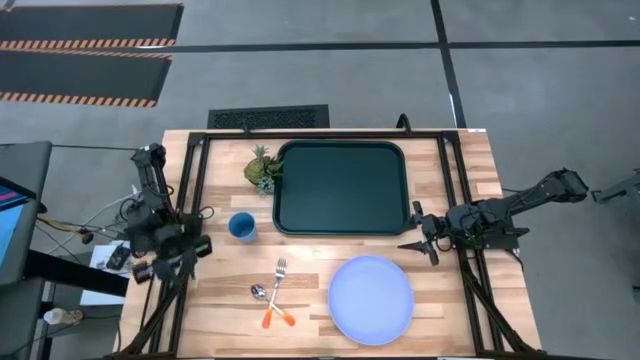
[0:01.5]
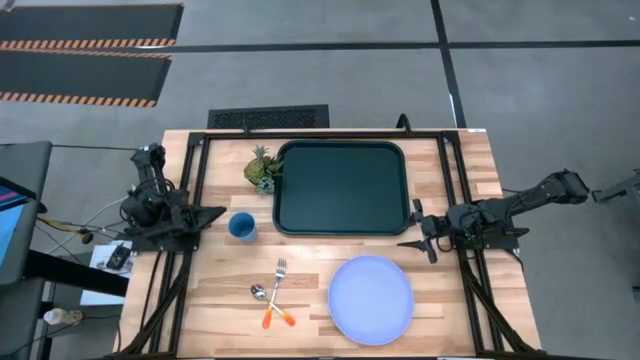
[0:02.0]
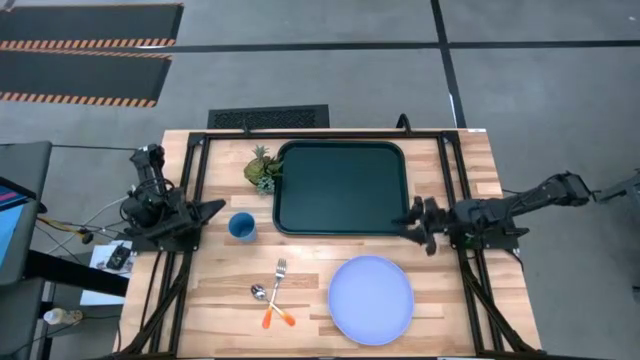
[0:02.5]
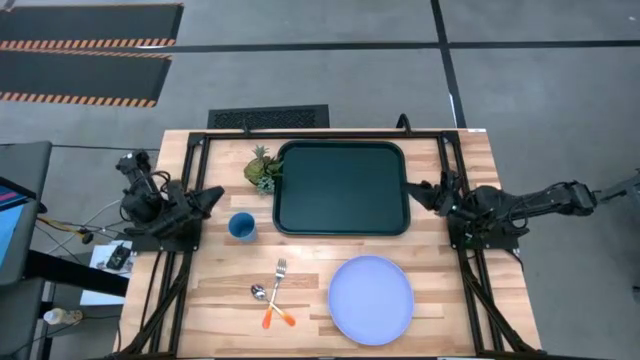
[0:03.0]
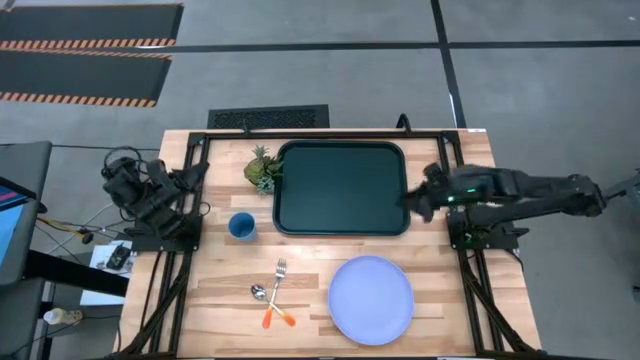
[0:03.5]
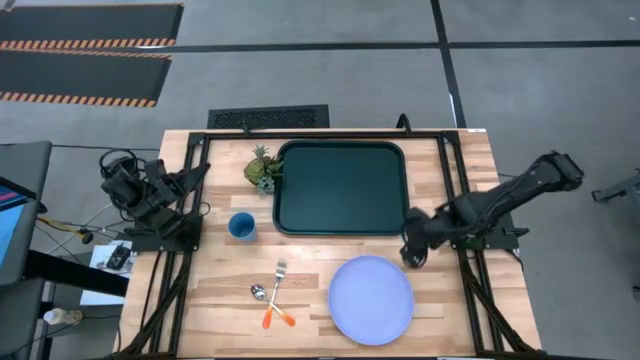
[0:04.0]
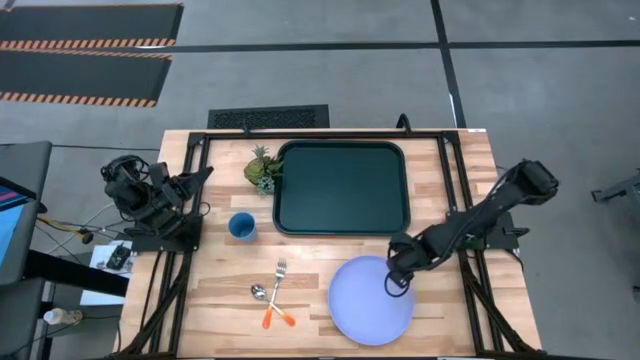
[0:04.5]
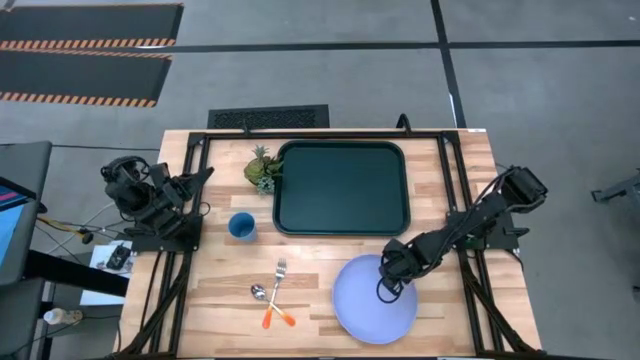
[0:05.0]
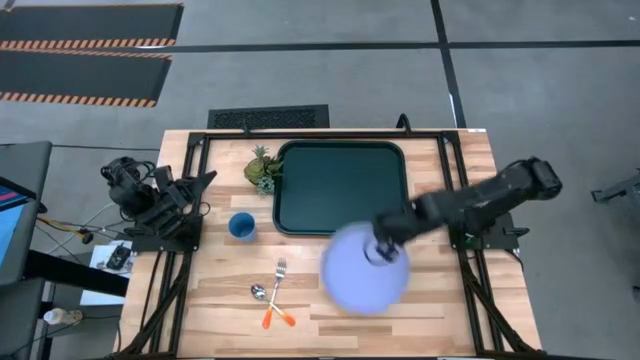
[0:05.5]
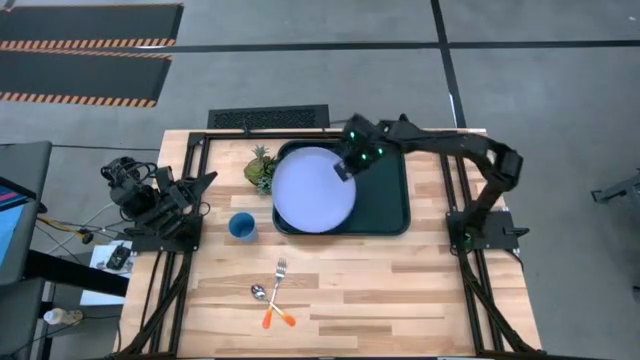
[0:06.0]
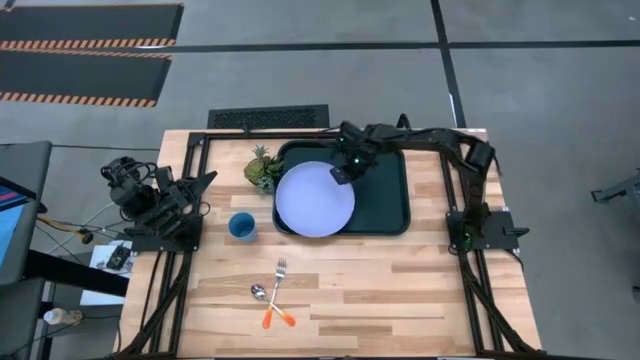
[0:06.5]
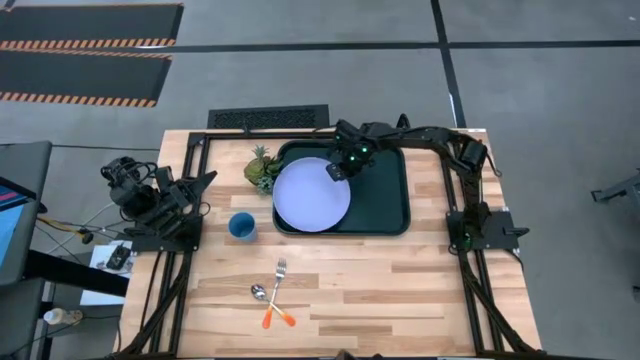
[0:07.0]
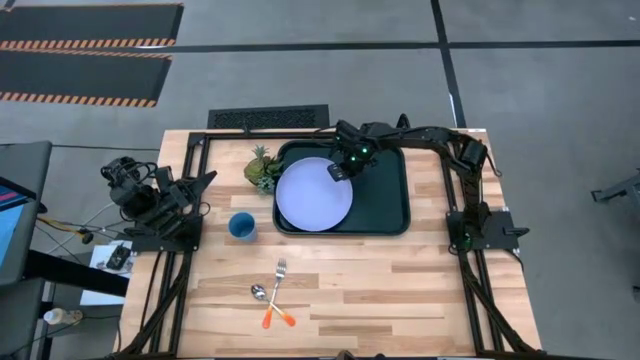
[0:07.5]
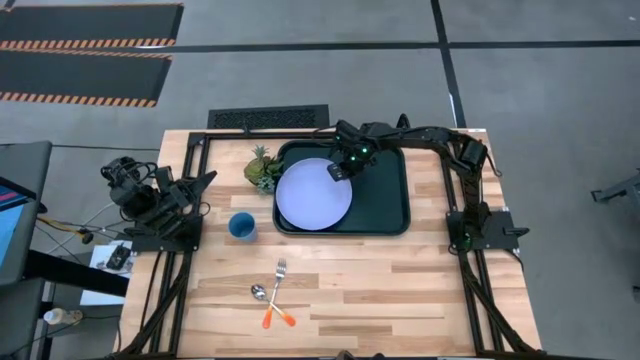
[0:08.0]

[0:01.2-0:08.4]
Task: Pick and place plate/cup/fork/spoon on tray
Put the violet plate on the black tray

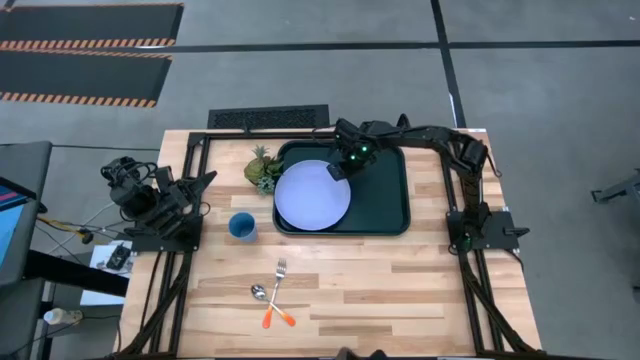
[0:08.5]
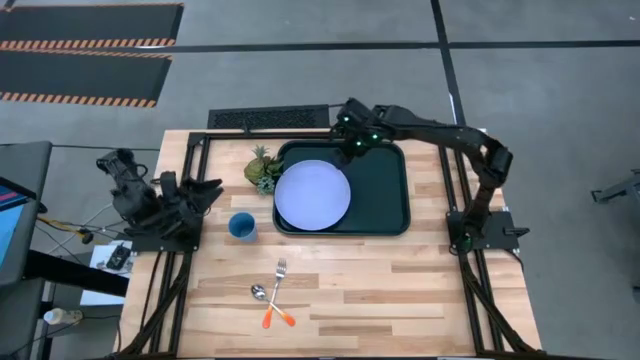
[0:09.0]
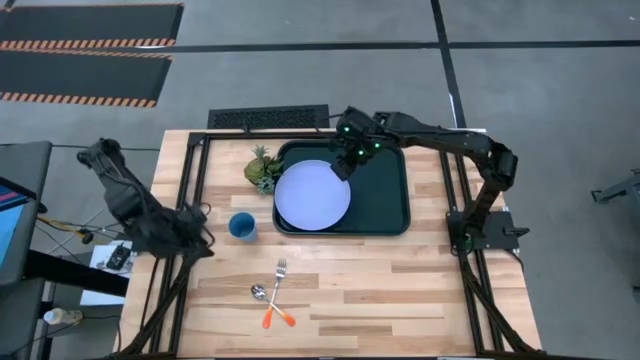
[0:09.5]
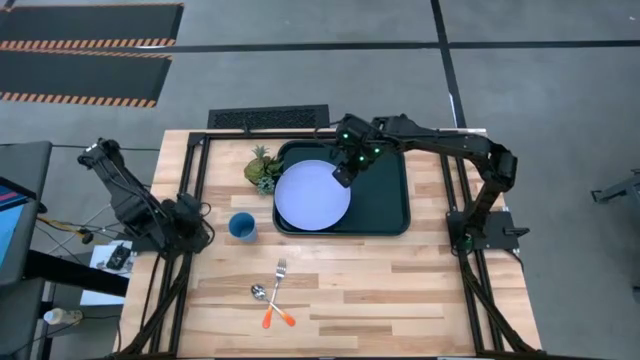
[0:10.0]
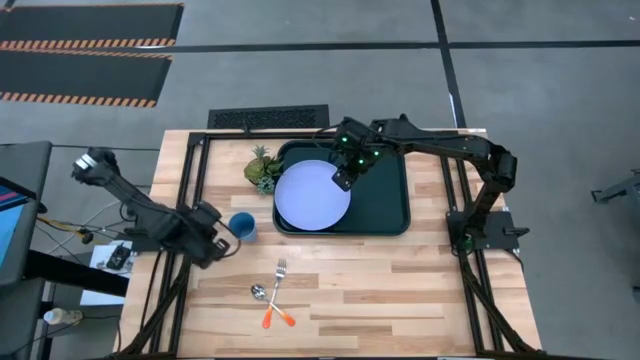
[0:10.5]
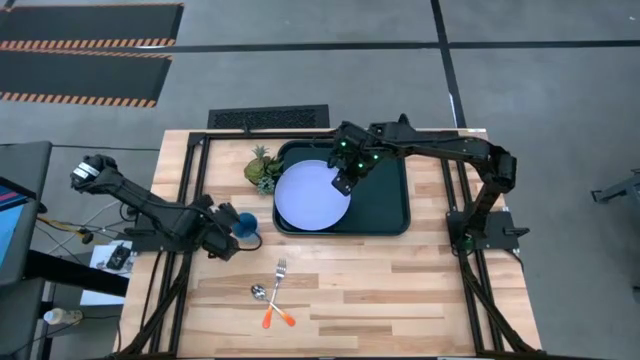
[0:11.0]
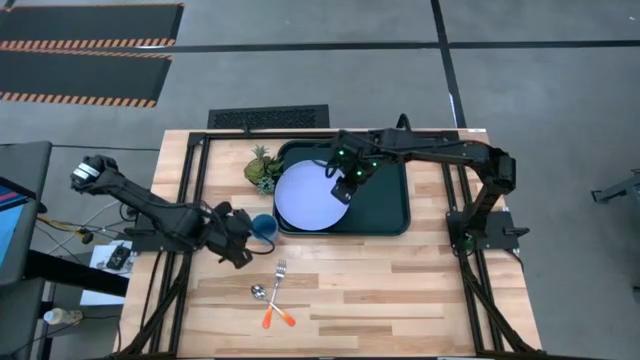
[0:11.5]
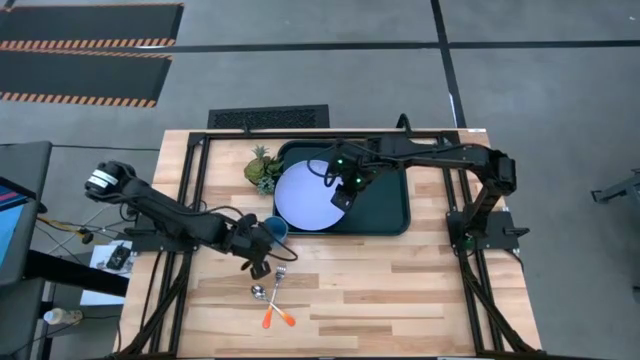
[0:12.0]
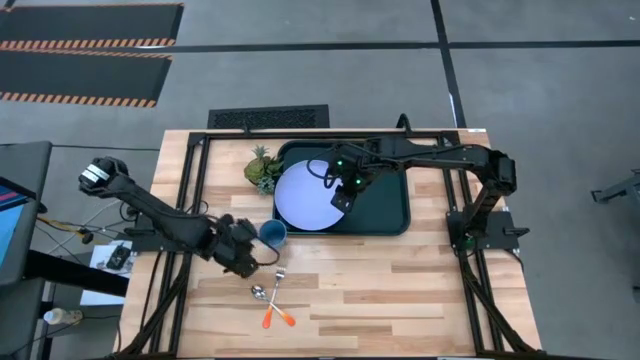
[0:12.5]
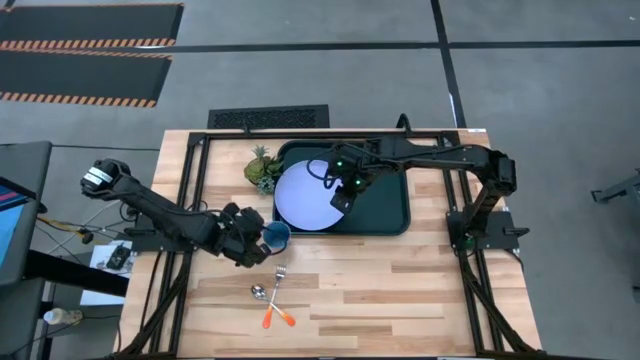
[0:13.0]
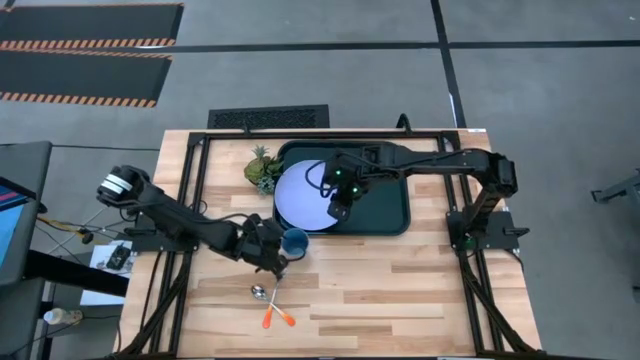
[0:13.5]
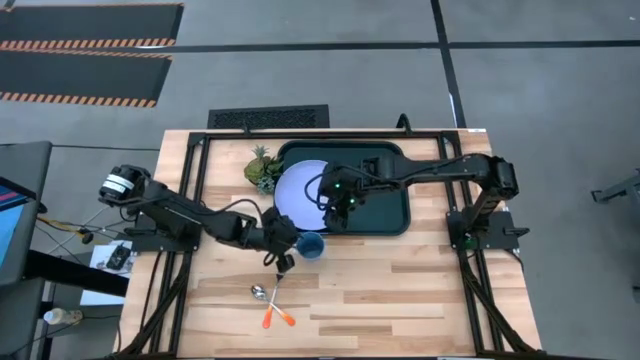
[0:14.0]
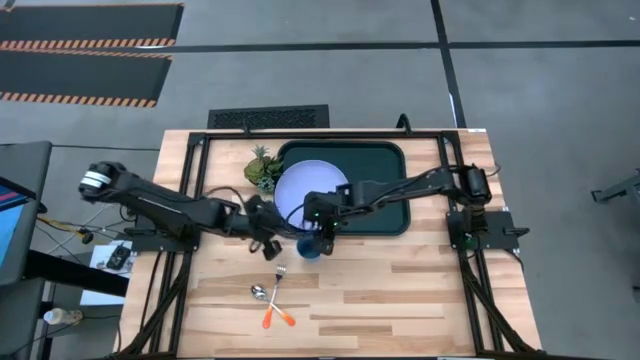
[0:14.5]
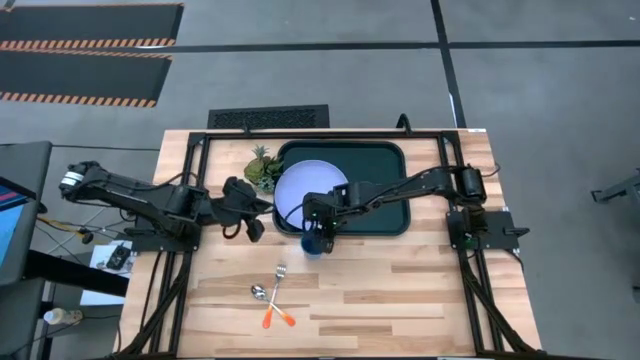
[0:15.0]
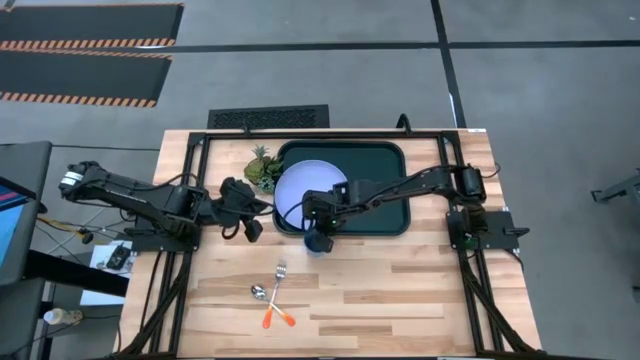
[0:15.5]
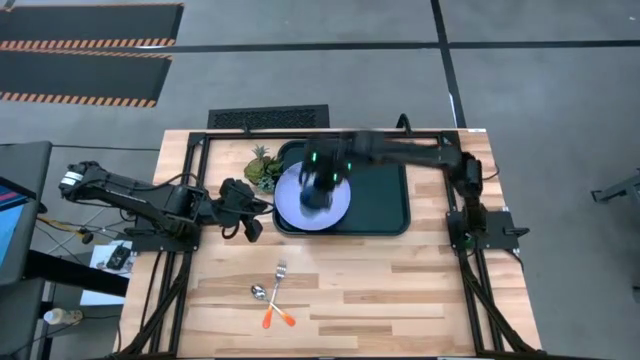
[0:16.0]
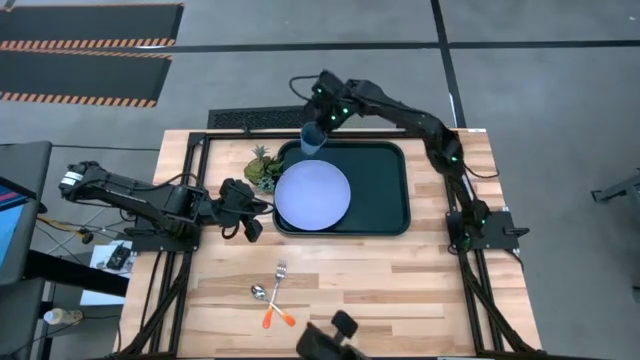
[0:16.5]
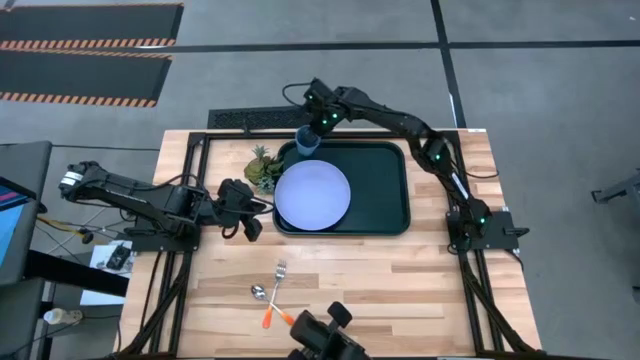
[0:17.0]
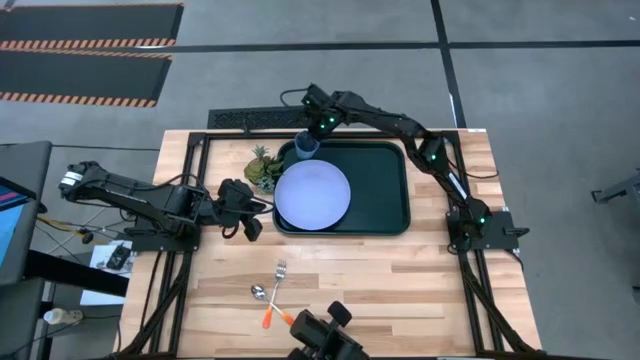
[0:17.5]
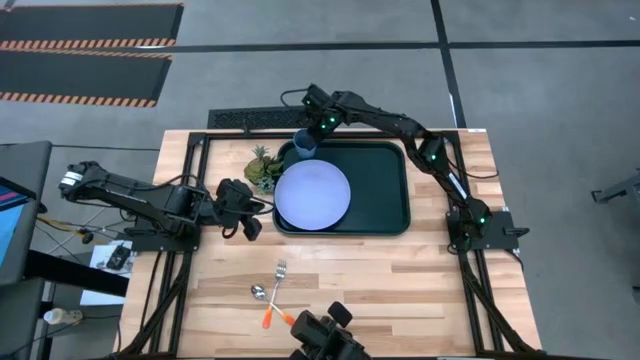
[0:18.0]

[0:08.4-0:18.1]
Put the blue cup on the black tray

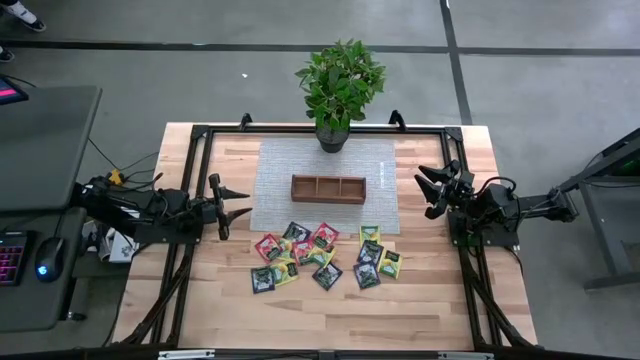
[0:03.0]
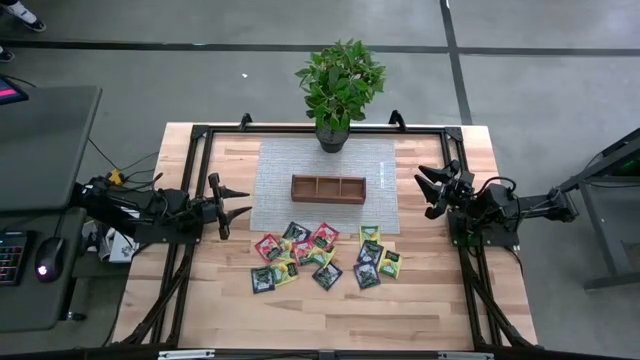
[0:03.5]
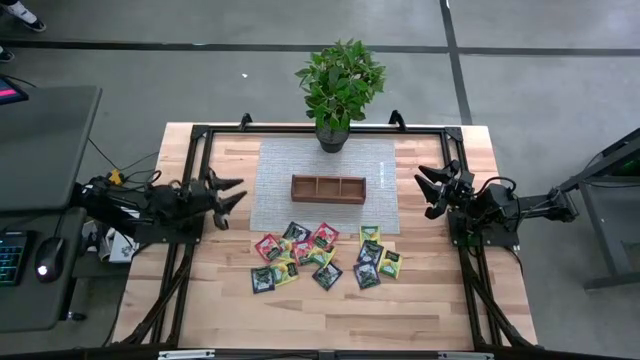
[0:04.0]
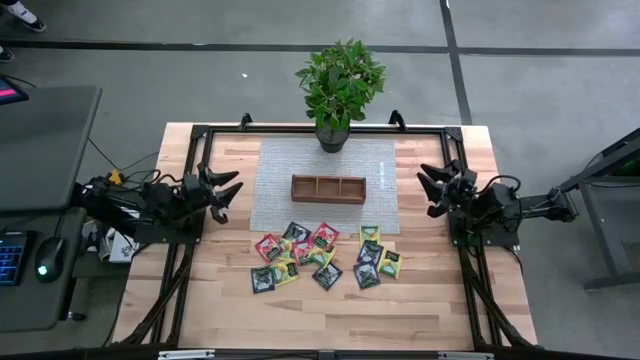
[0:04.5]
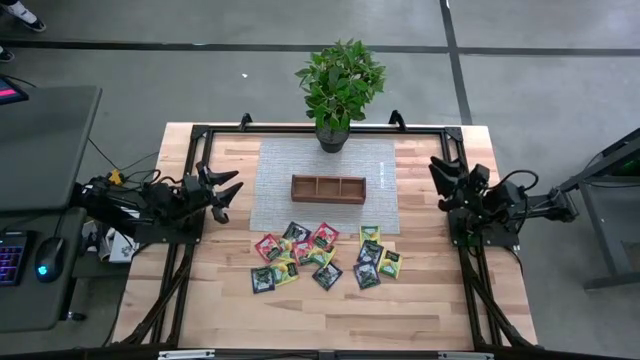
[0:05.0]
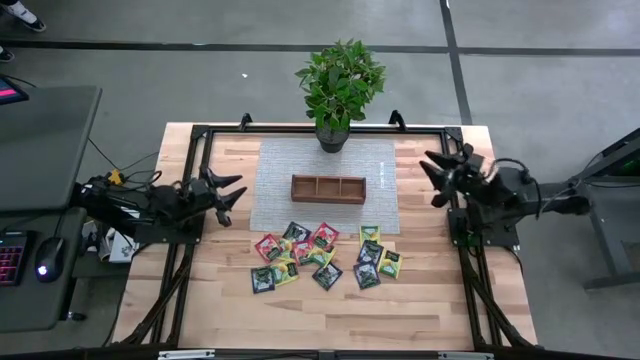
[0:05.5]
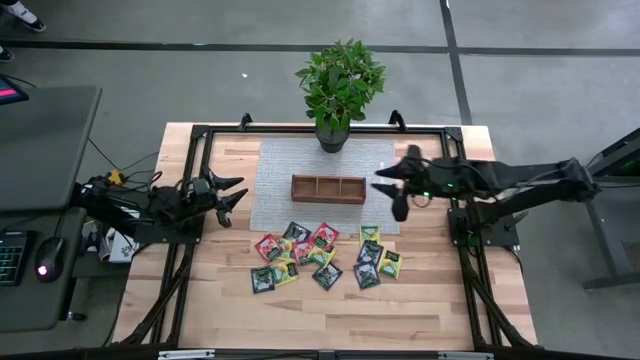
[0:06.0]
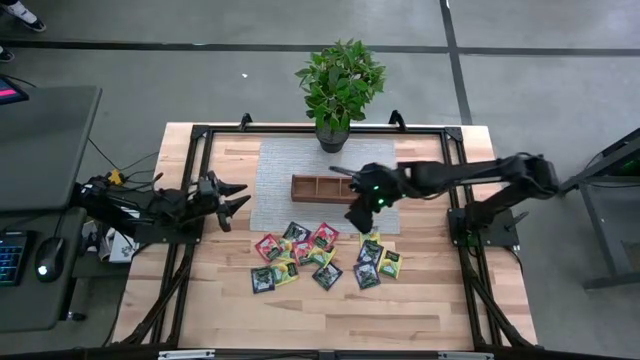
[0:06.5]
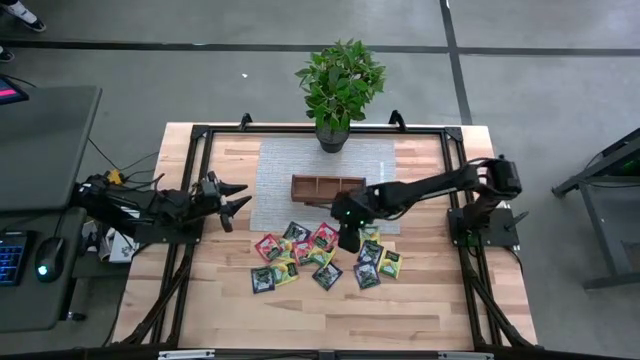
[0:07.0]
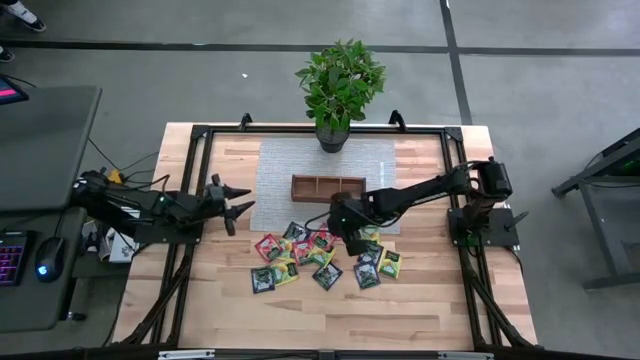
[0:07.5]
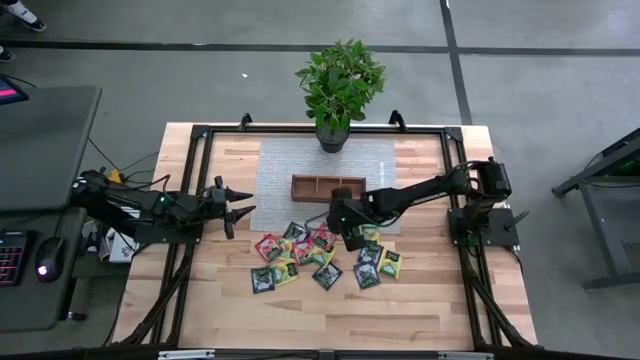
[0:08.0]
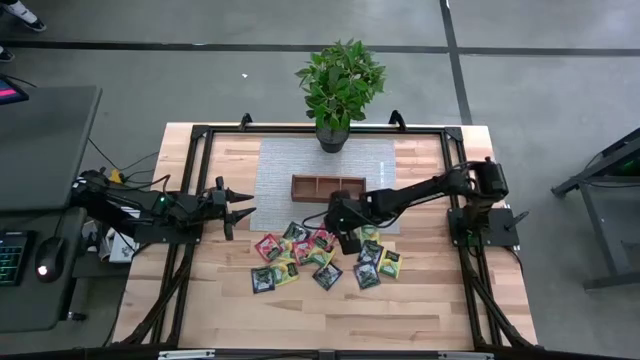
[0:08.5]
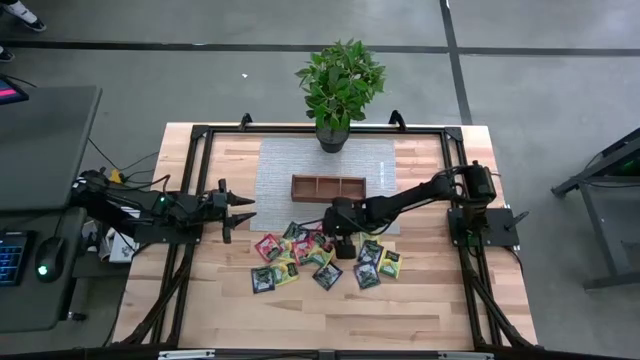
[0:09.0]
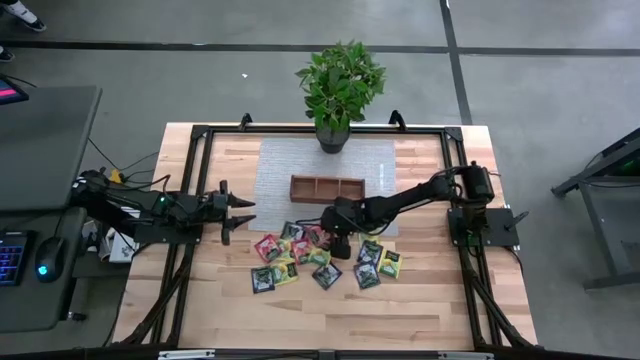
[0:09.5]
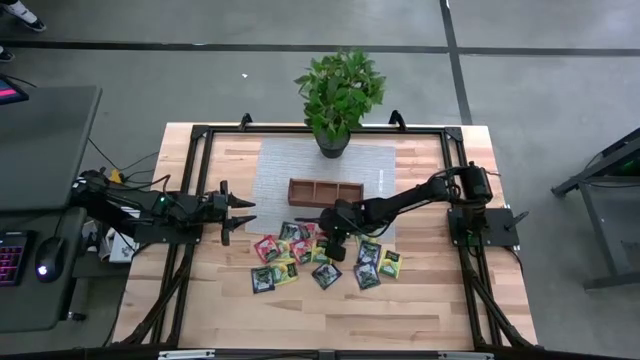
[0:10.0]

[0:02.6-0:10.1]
Task: Pick & Place Tea
Put the red tea bag into the left section of the wooden organizer
